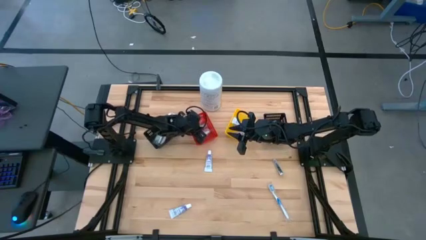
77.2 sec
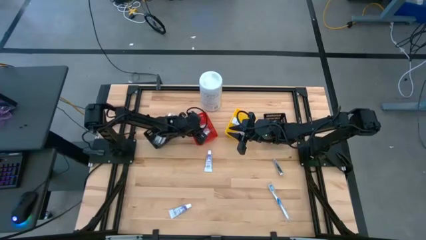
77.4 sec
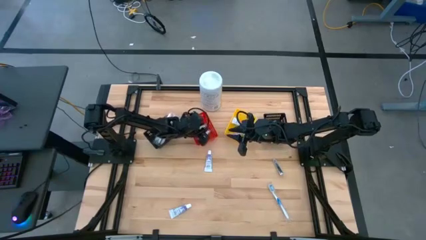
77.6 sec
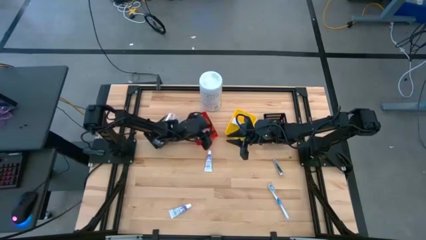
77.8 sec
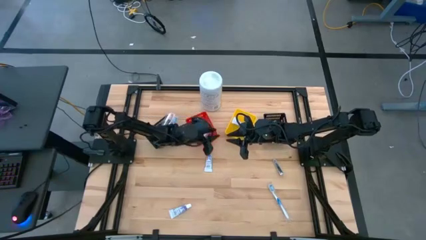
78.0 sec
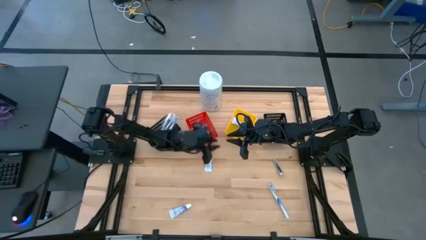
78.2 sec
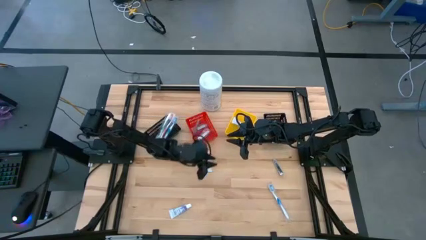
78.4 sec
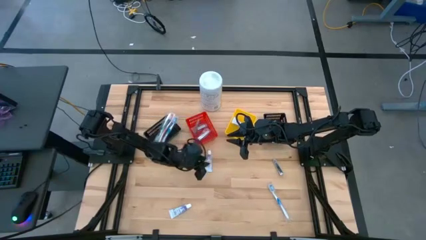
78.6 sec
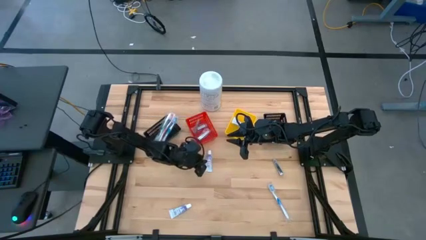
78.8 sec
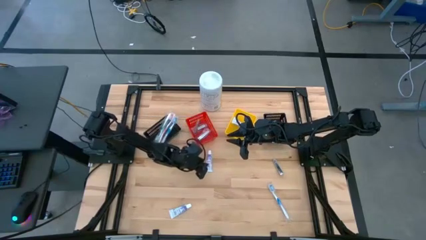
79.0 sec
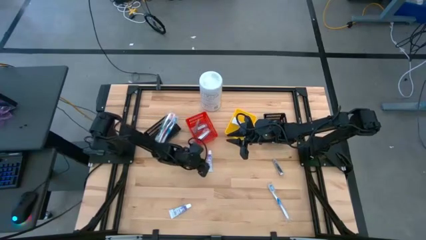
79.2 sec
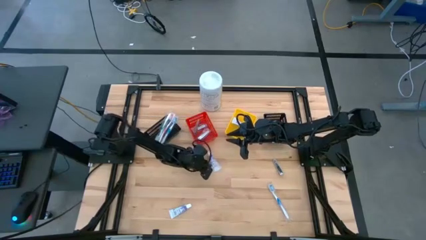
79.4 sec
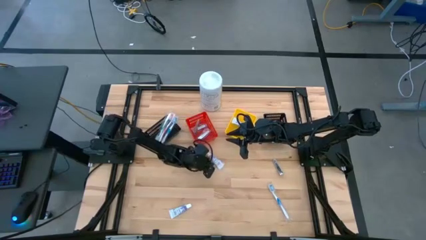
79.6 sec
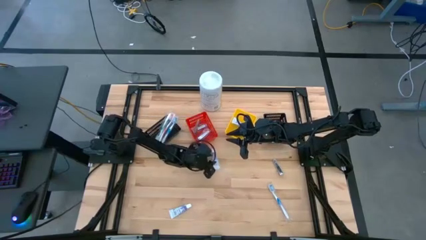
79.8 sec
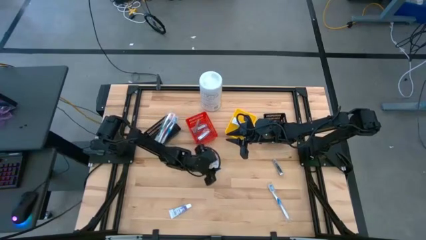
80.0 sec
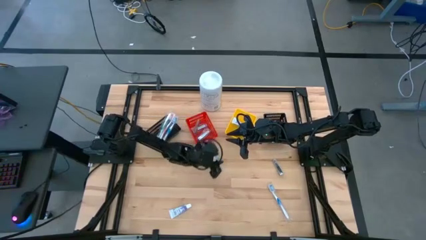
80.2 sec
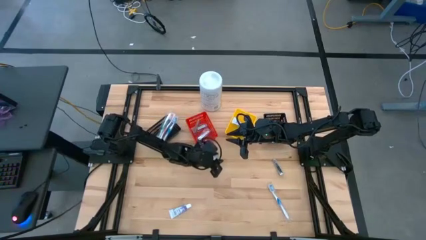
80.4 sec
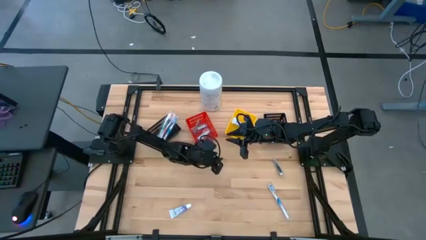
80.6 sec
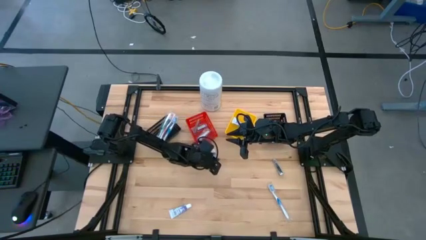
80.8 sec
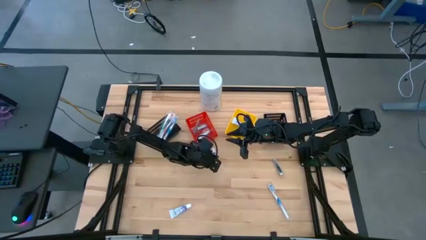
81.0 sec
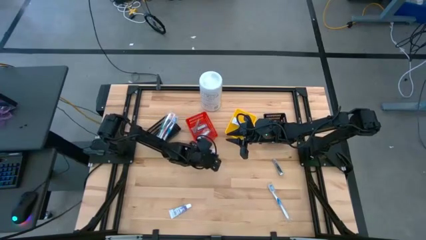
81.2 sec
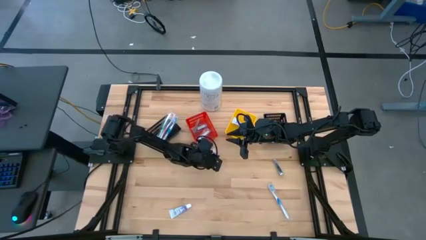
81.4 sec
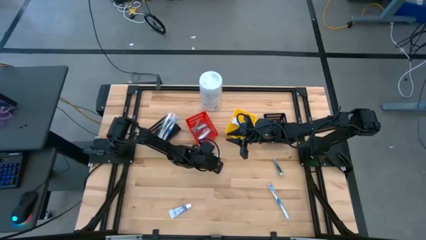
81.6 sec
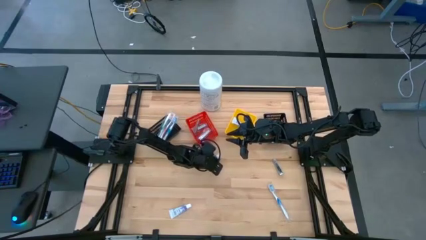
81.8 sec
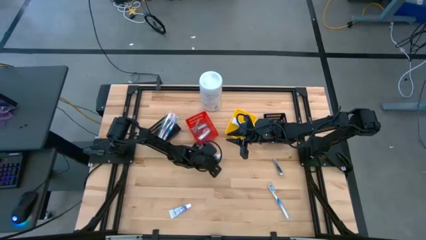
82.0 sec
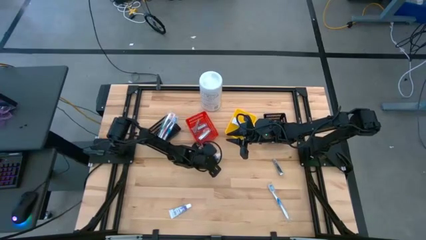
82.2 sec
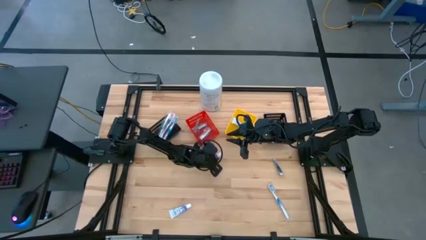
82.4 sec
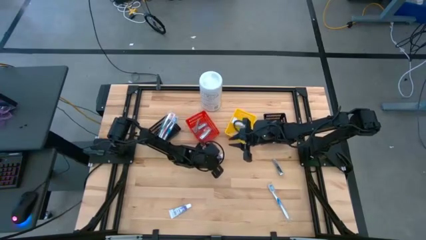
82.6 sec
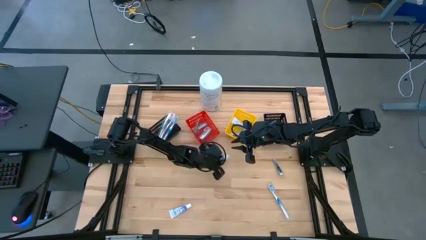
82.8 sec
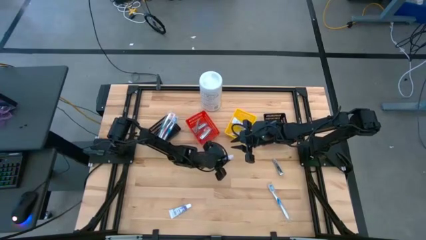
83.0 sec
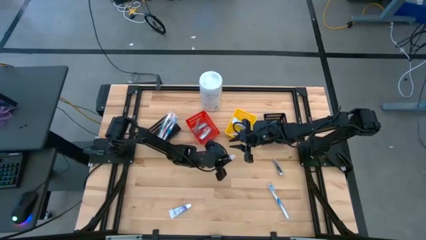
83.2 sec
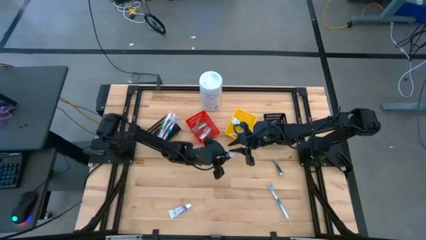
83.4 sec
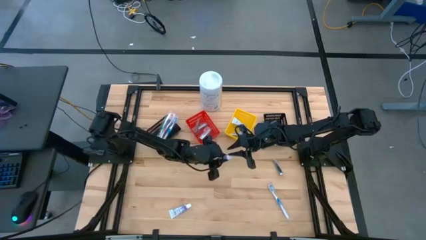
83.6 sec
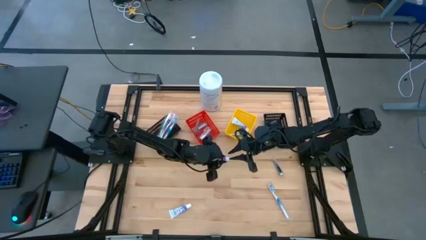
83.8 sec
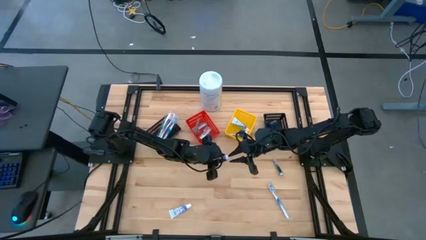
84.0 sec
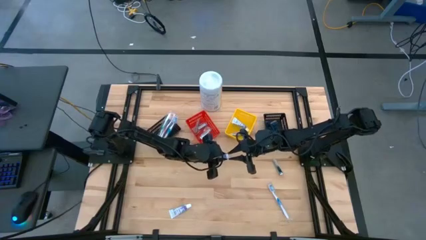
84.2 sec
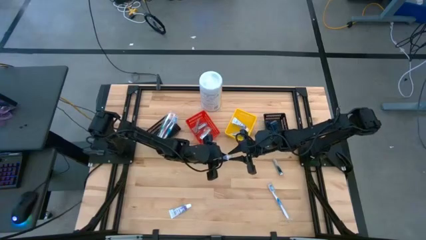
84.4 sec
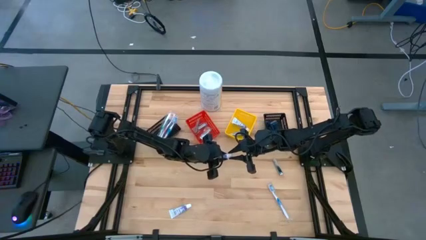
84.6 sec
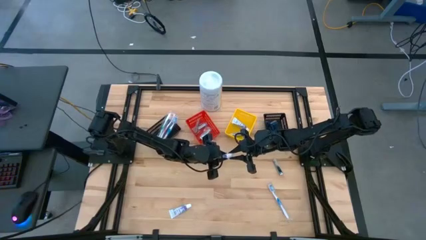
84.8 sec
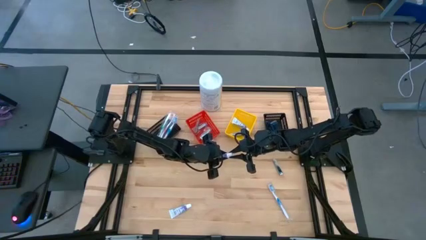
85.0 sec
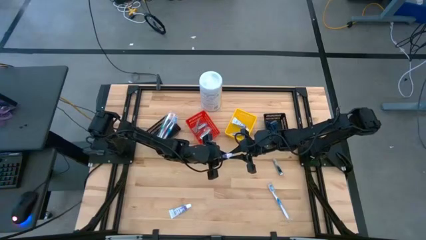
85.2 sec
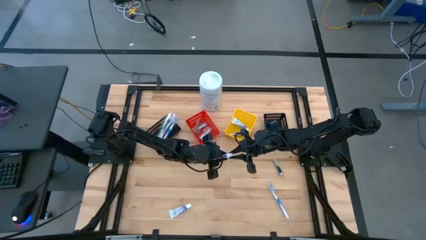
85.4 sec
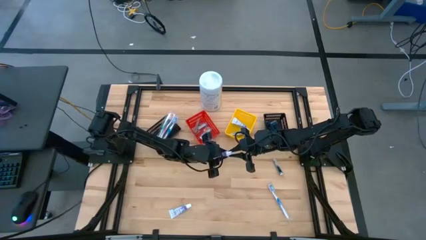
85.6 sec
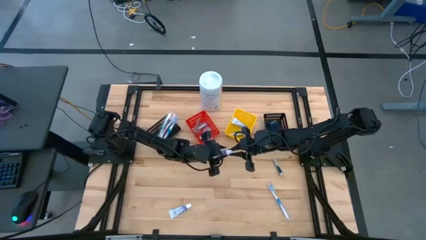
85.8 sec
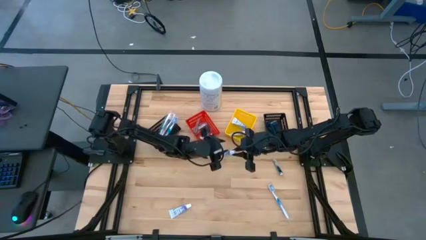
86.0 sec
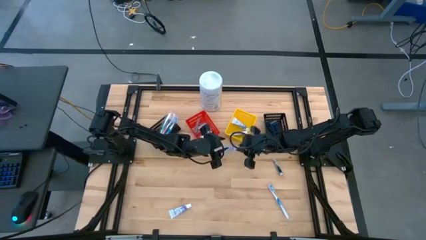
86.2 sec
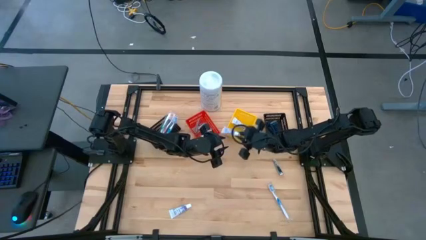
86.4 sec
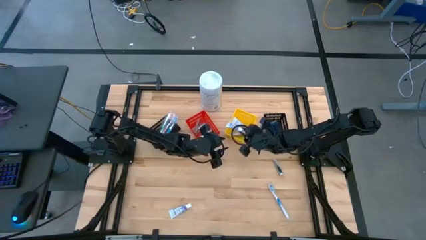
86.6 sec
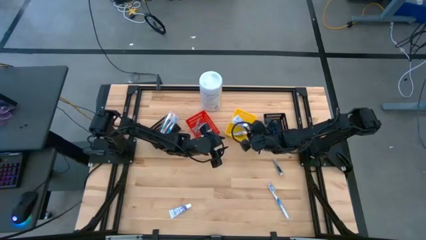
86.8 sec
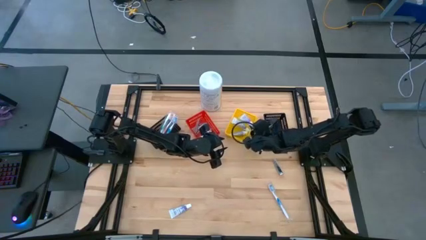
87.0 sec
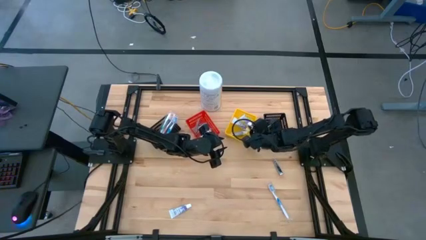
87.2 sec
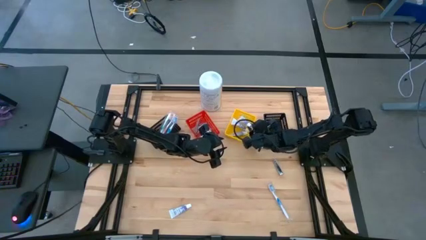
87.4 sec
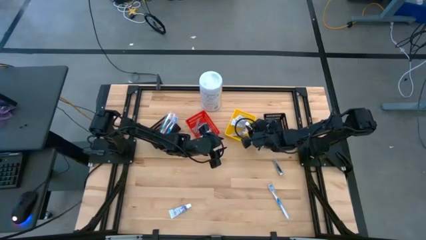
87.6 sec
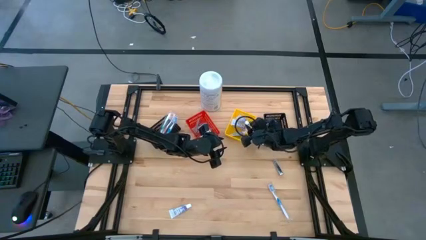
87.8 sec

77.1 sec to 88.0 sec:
Task: Pick & Place Travel size toiletries
Put the top white toothpaste into the yellow basket

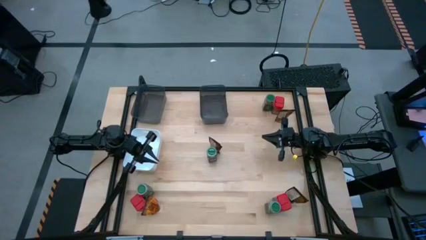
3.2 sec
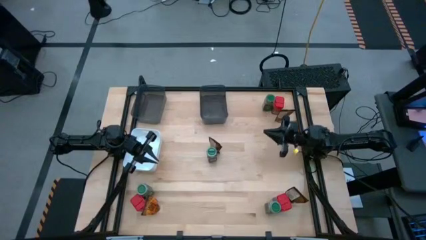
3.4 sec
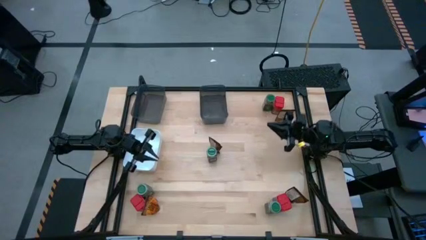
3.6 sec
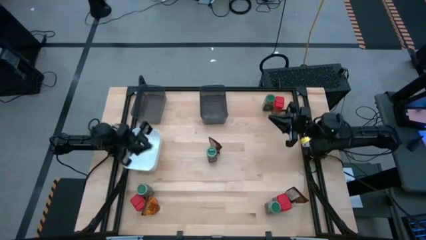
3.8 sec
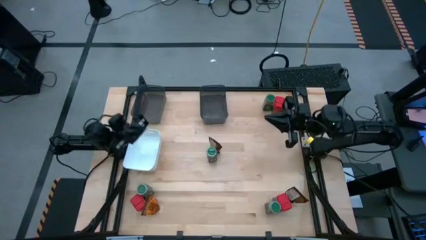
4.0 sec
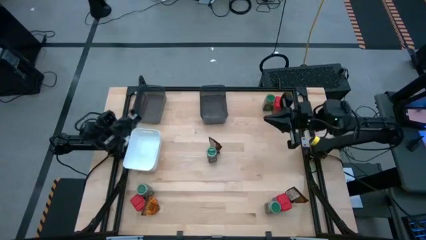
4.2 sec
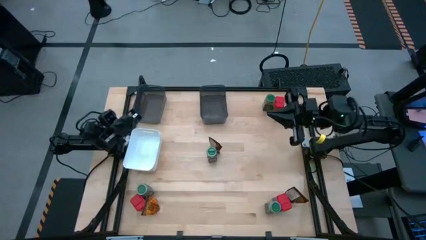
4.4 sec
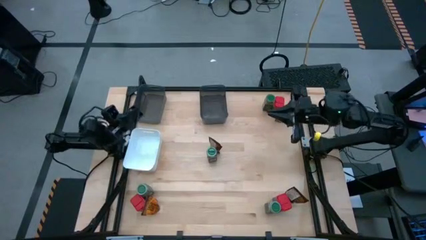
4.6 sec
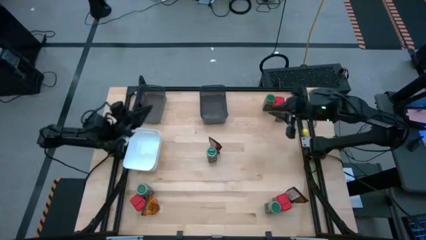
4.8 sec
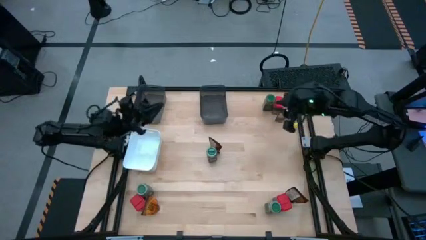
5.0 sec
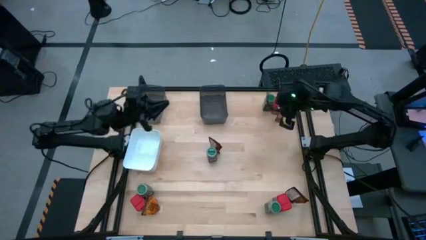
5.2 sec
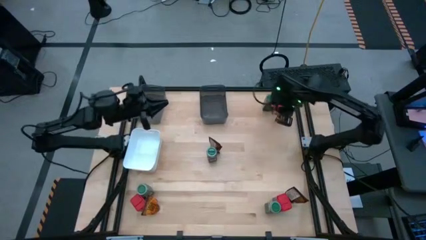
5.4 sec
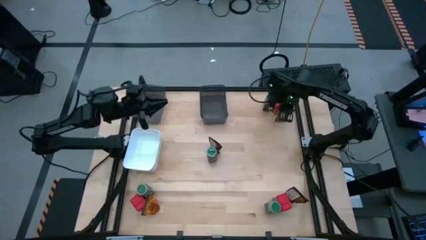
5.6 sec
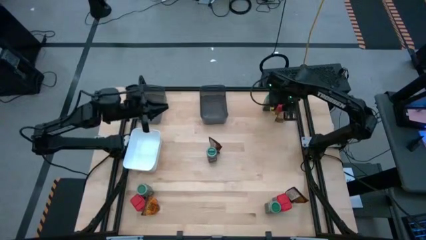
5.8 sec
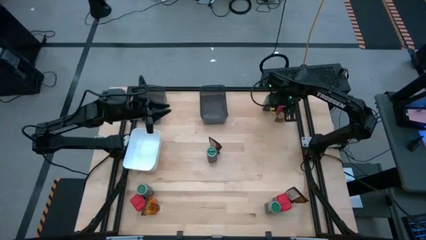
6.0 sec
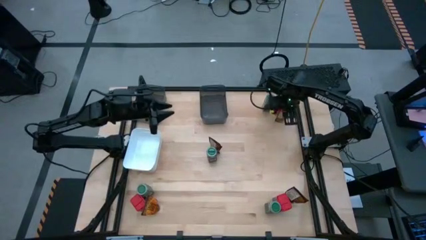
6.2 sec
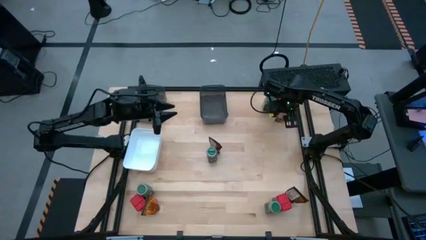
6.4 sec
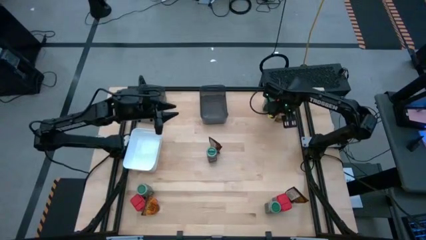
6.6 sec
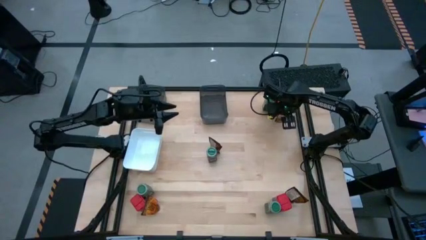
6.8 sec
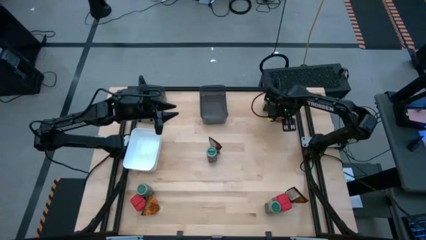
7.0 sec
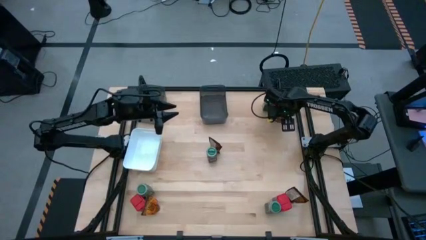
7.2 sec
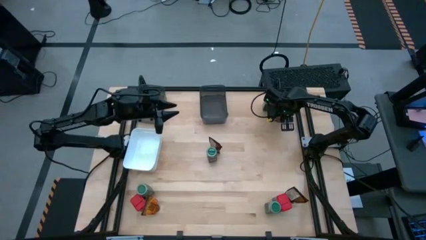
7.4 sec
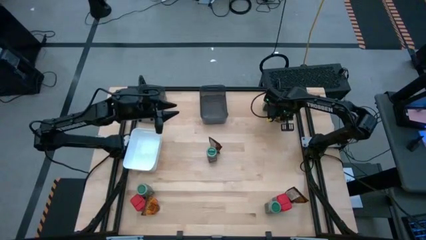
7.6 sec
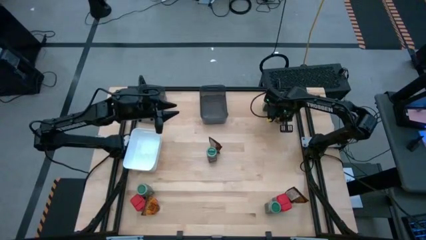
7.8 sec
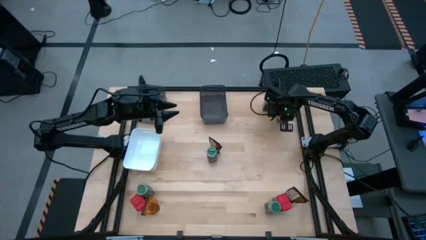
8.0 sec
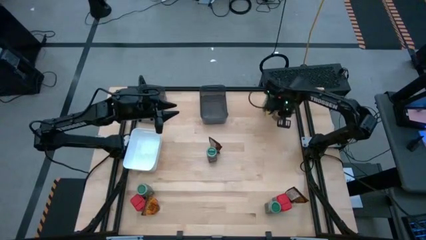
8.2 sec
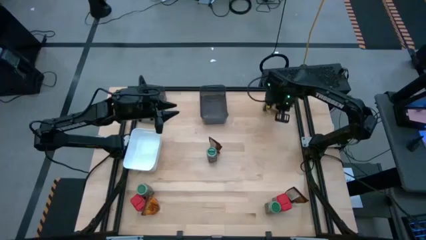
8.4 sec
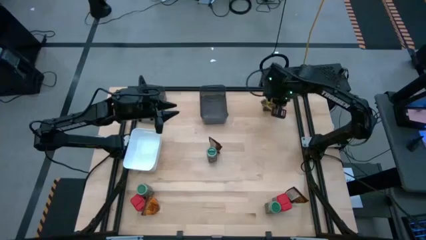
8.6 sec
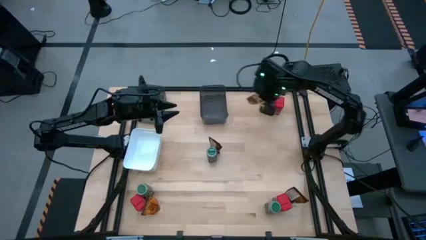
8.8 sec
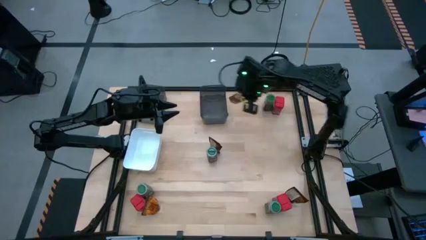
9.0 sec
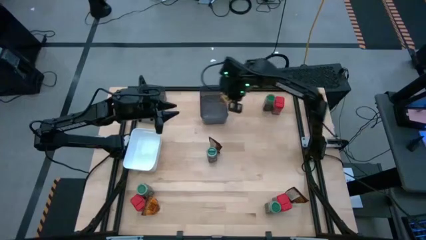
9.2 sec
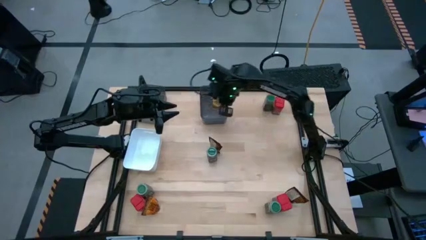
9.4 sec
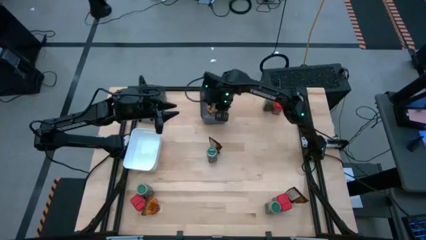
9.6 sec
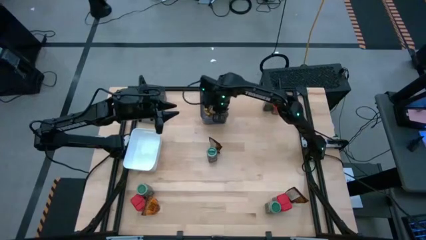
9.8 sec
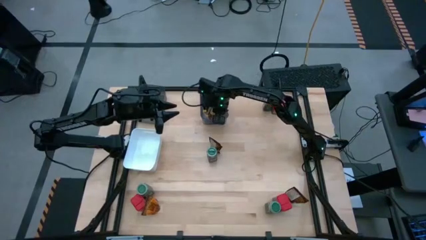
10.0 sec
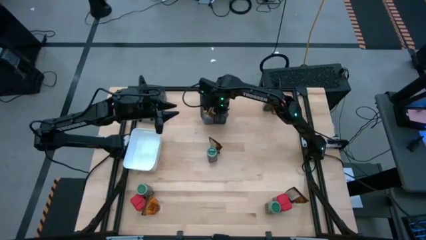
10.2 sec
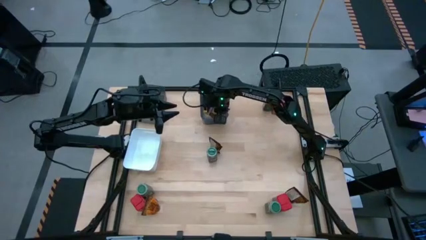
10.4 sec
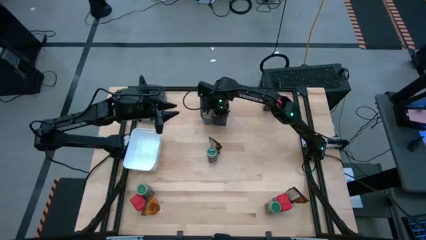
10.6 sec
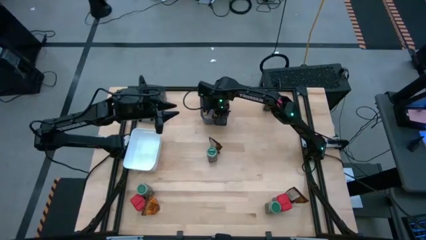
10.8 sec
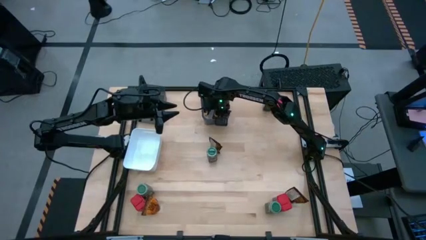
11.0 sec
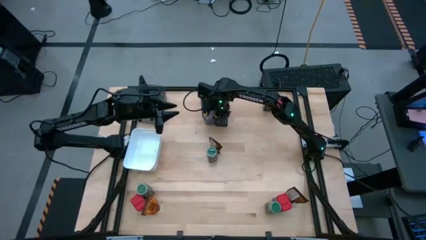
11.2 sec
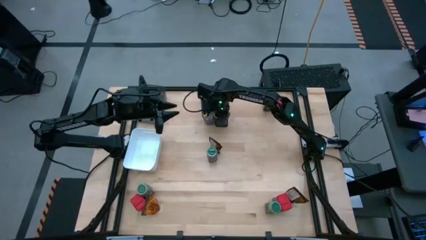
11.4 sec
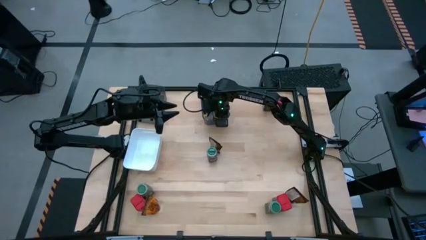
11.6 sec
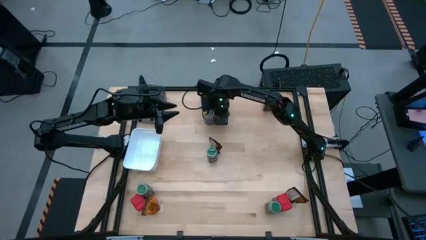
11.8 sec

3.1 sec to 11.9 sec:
Task: Sort spices by type
Put the top right brown seasoning bag into the middle black bin
